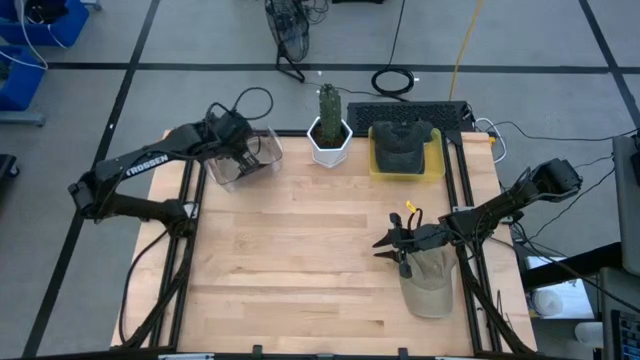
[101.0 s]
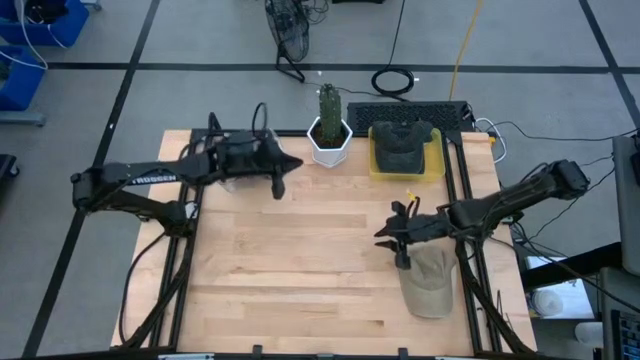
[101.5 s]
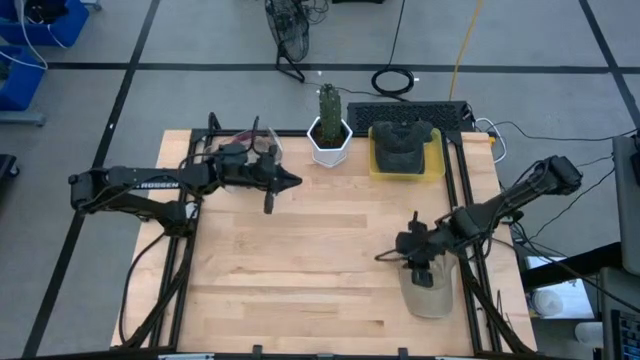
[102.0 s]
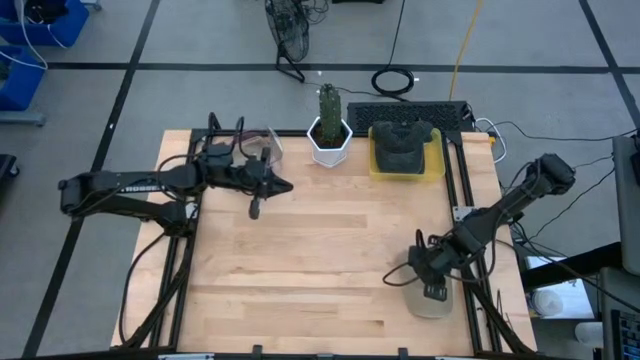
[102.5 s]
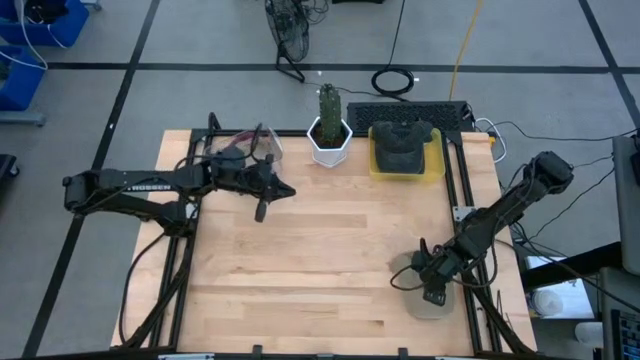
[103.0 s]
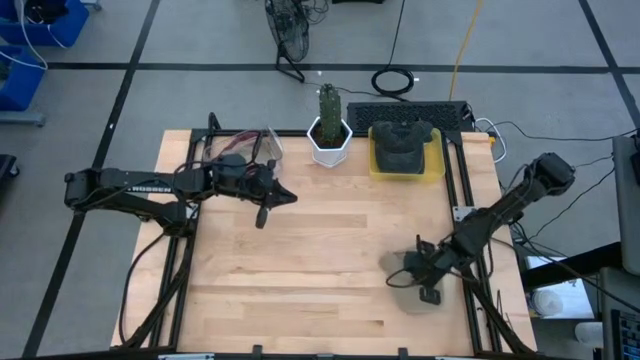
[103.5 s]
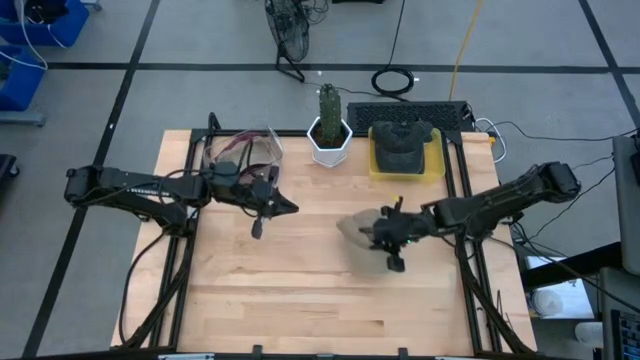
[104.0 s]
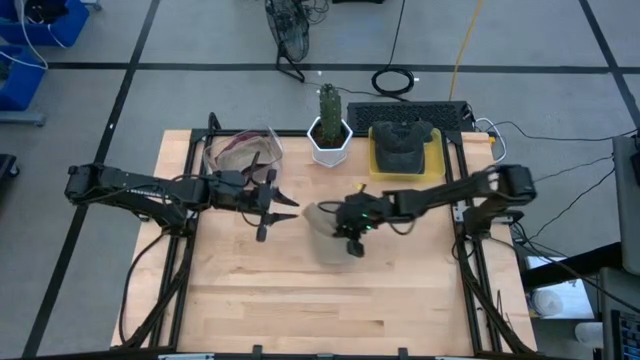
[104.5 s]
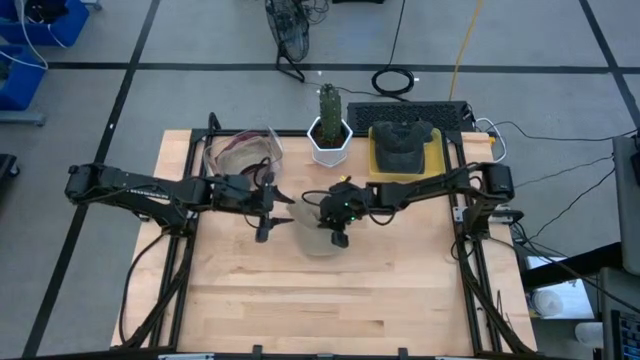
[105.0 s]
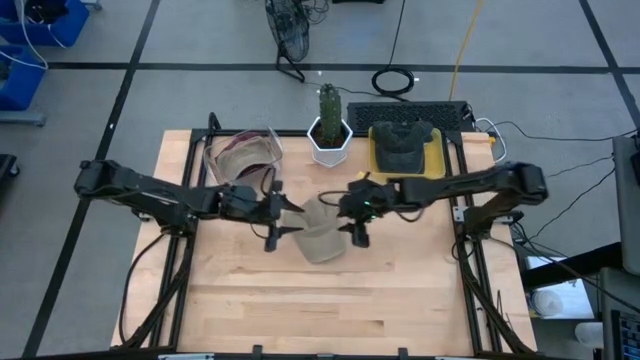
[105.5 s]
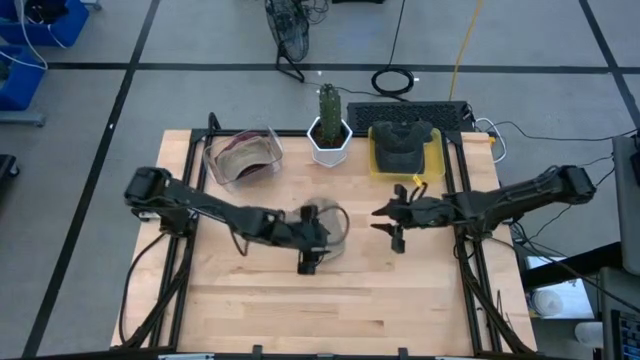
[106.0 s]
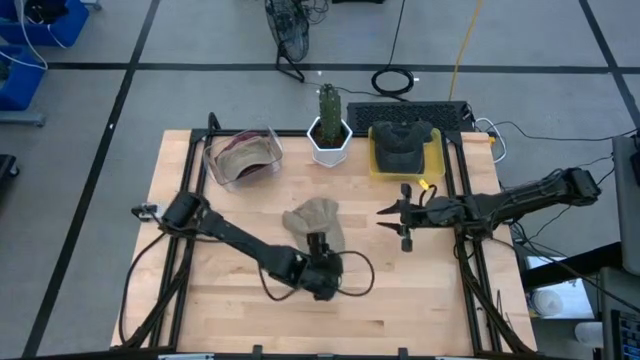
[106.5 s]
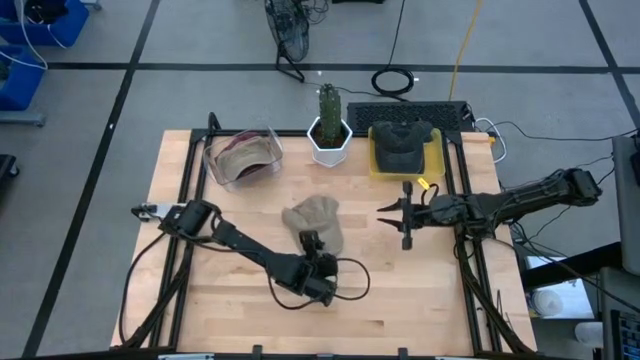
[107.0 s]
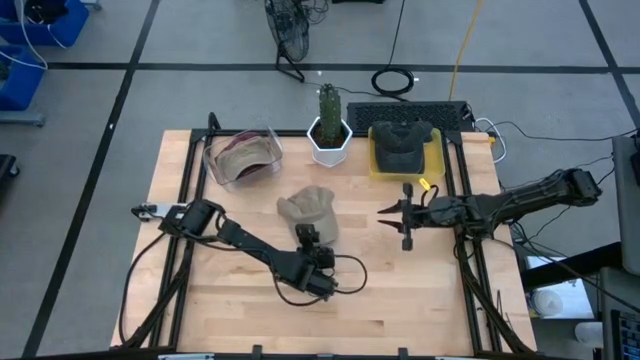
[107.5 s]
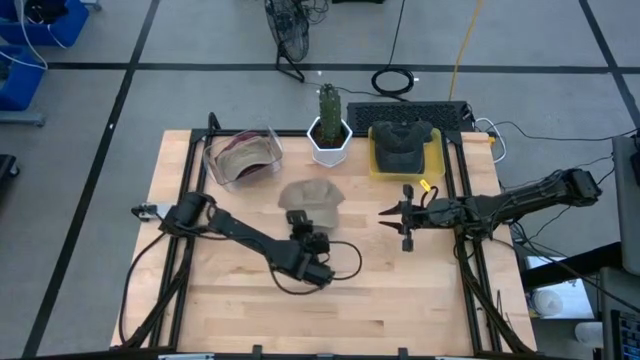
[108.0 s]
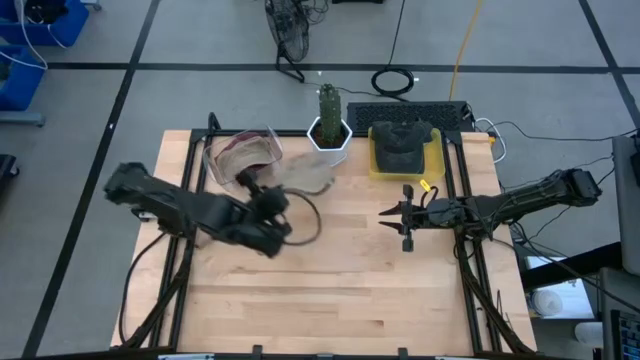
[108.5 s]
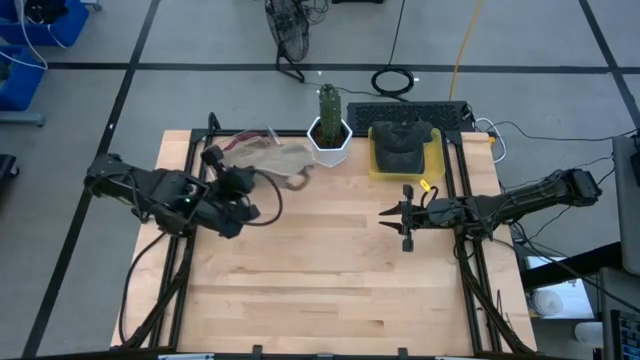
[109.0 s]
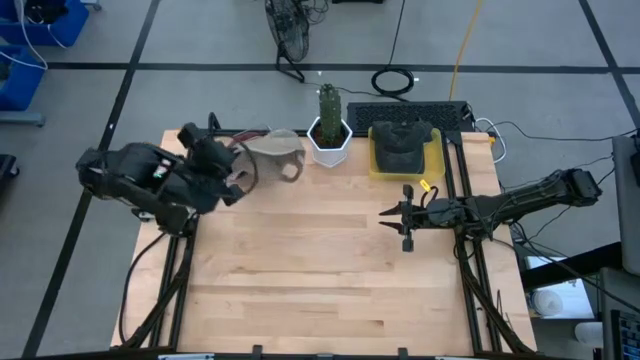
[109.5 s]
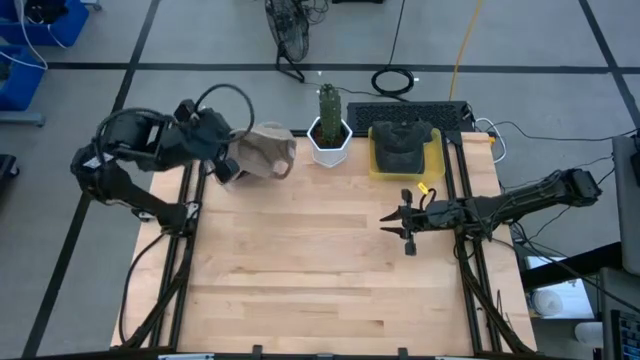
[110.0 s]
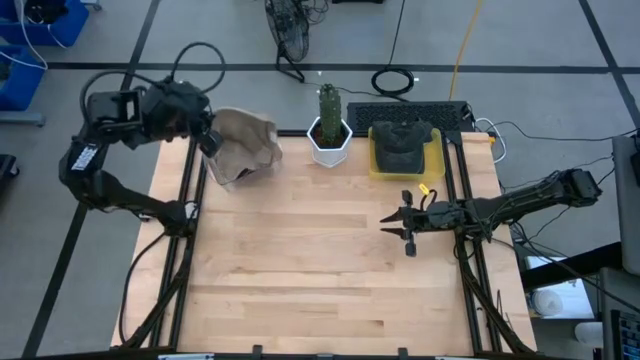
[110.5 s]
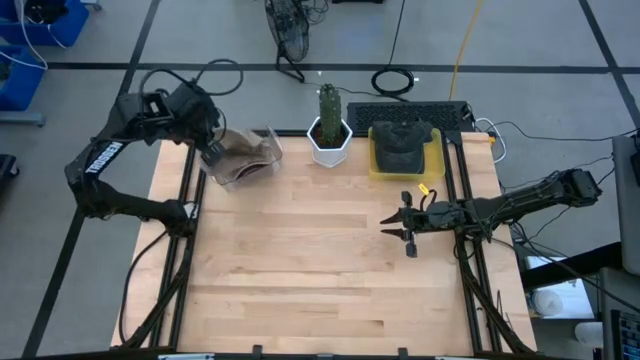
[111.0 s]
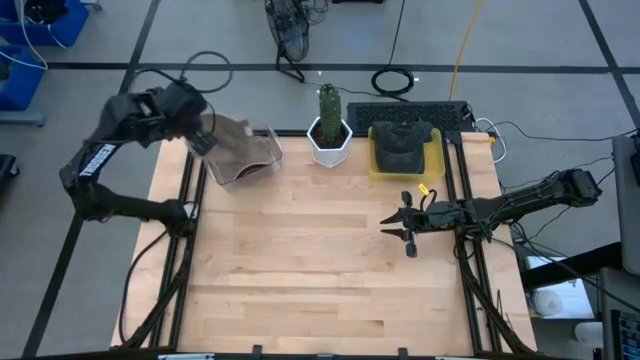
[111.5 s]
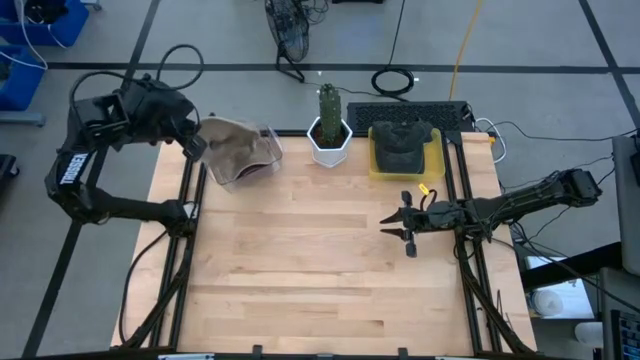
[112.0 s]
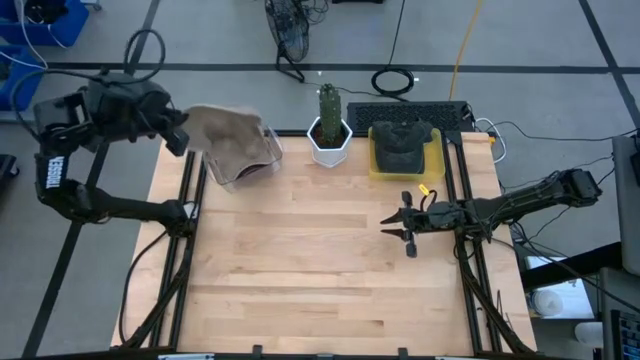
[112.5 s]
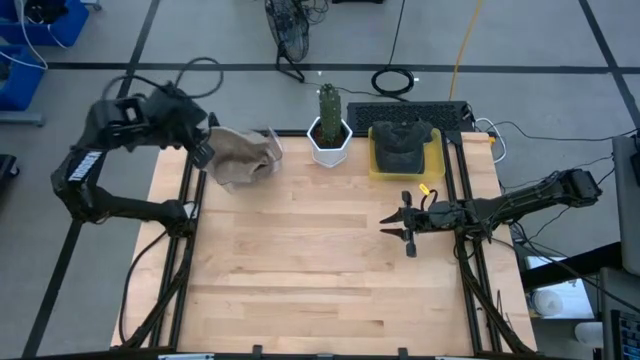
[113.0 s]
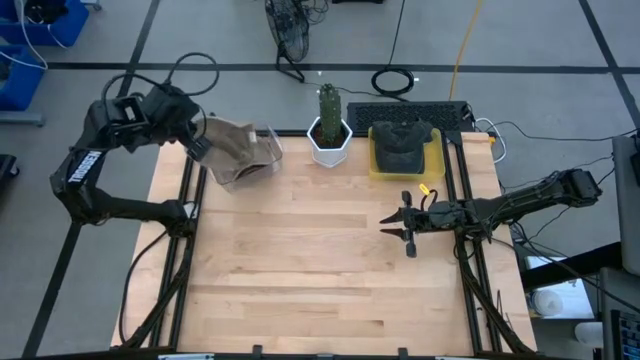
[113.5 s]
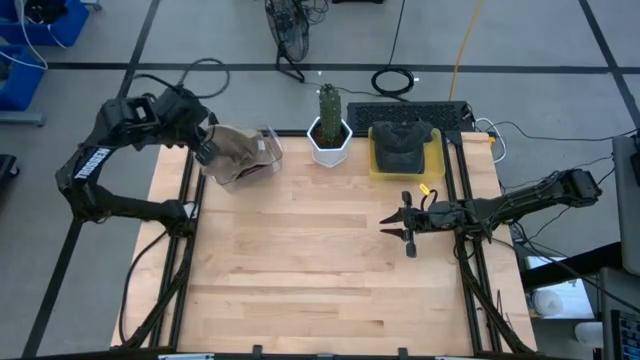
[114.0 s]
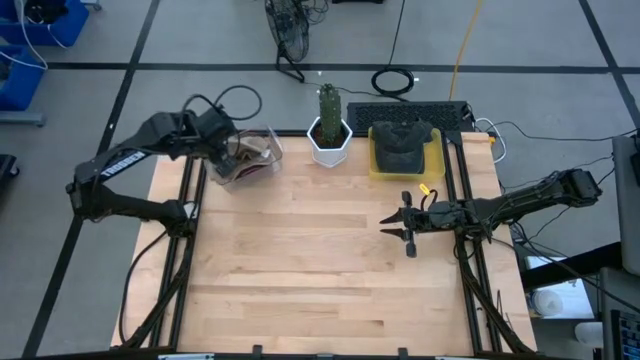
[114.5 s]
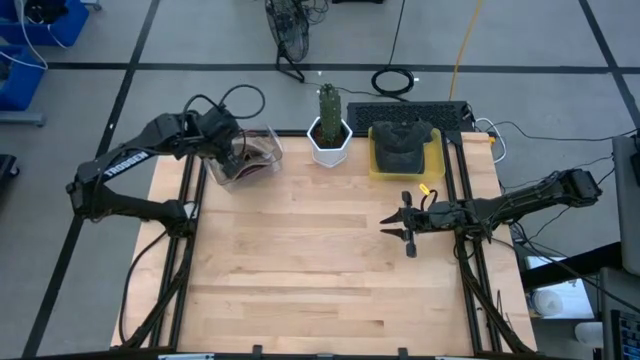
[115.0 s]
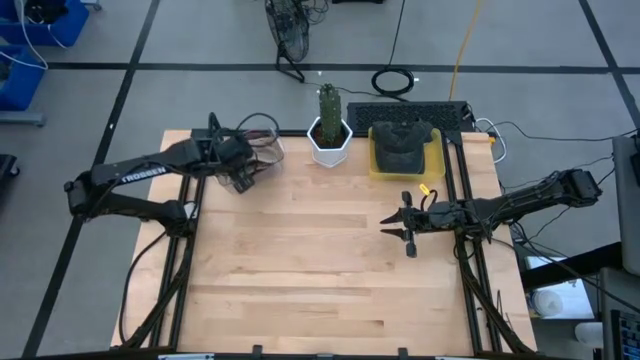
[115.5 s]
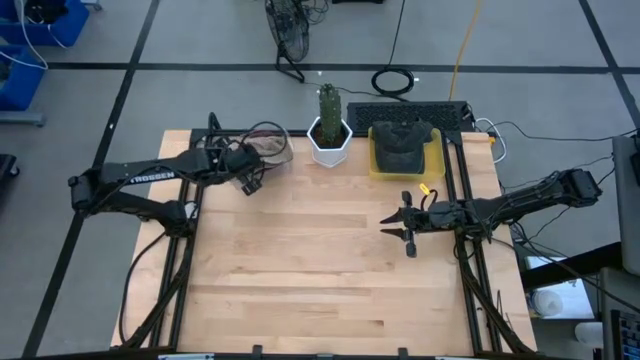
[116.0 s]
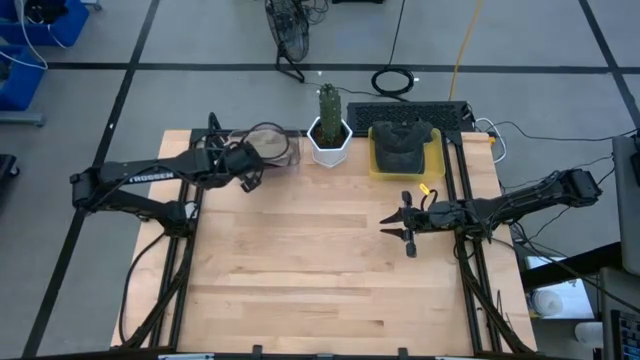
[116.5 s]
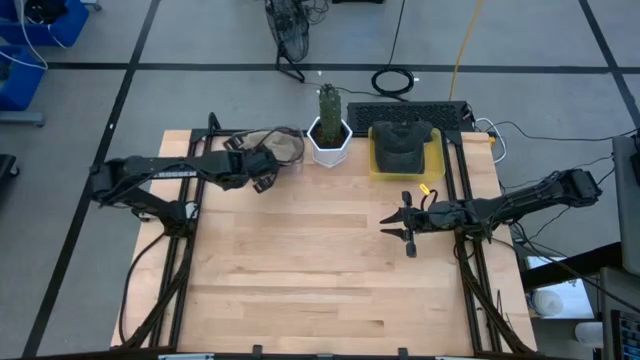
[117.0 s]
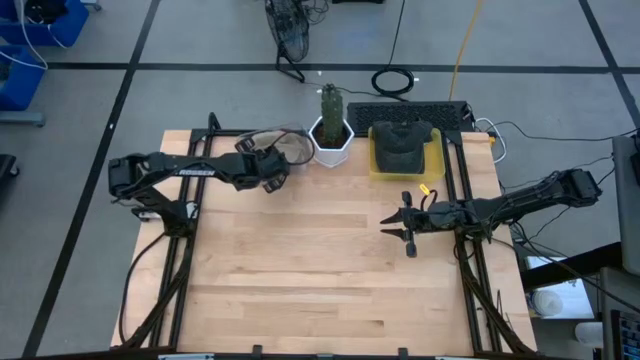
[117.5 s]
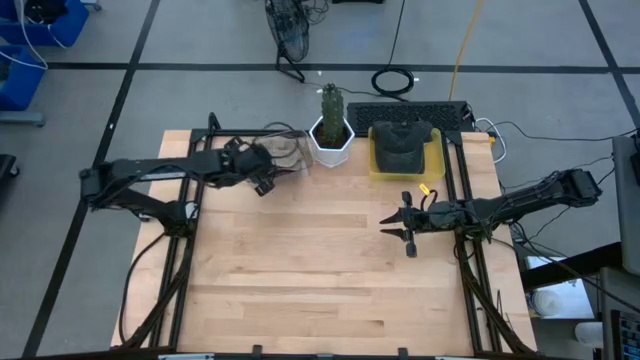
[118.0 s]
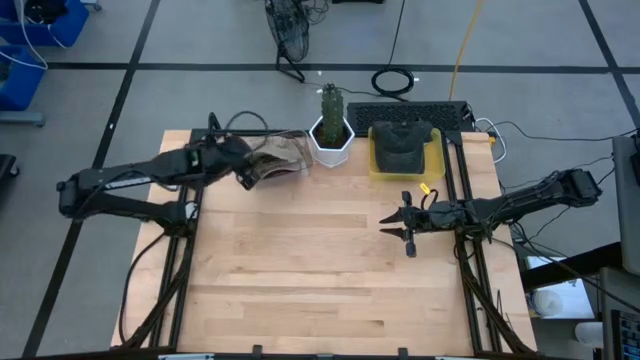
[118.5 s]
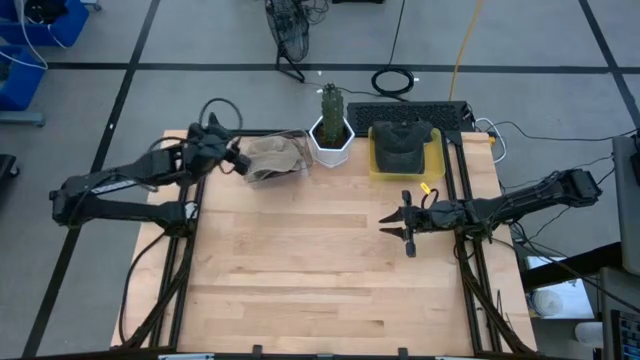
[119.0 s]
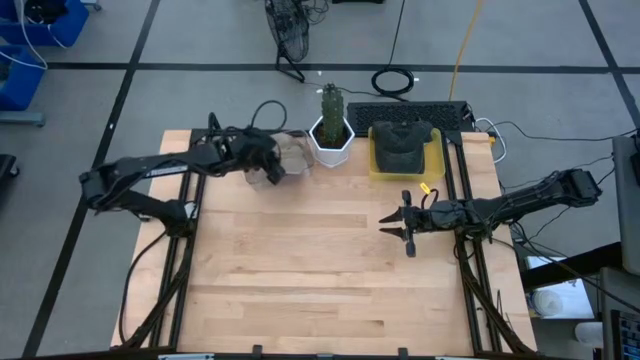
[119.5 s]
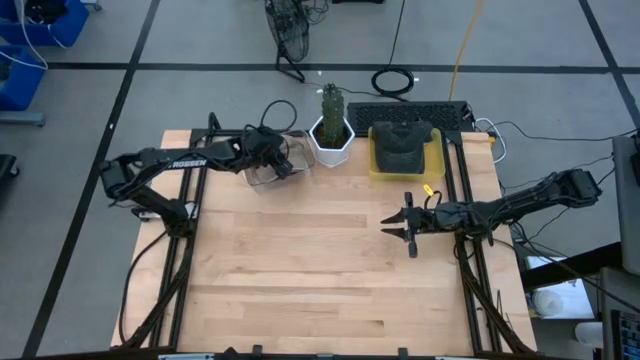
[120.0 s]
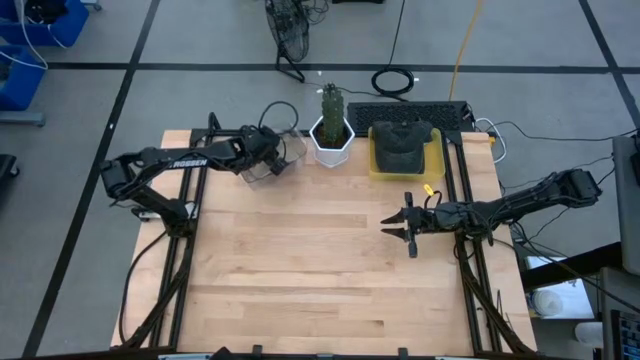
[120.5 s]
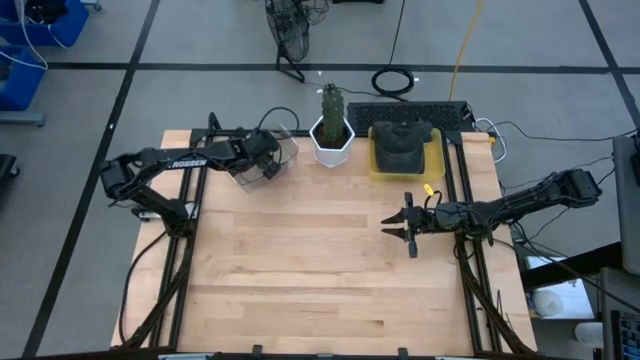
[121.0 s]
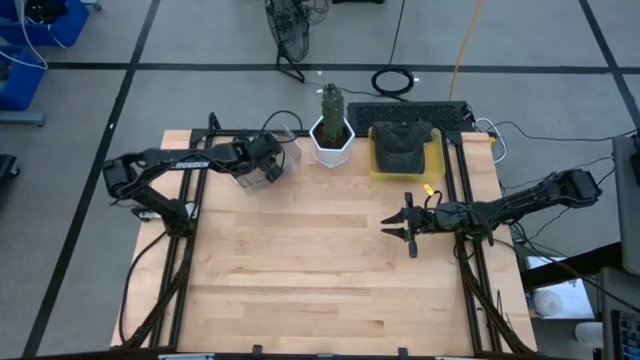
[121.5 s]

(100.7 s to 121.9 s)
Task: Pick & Place hat
Put the brown cap into the transparent bin

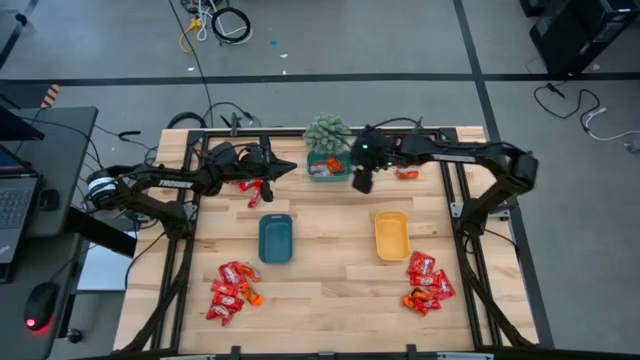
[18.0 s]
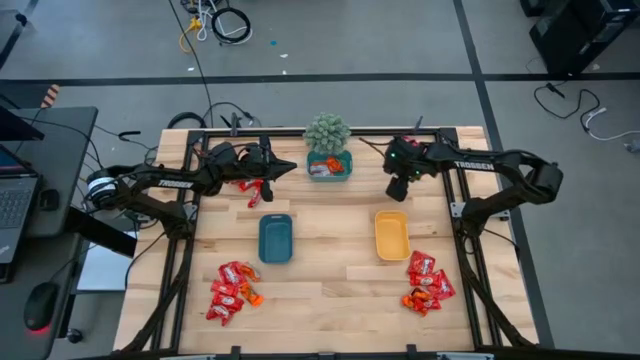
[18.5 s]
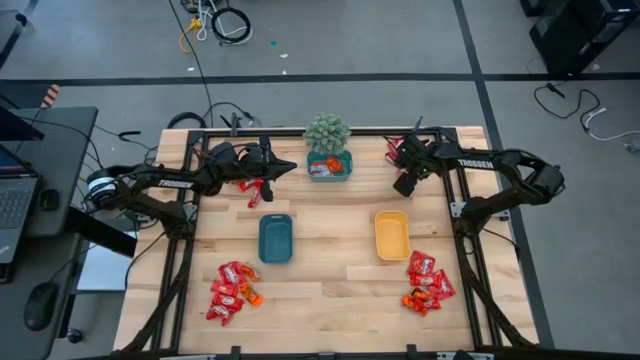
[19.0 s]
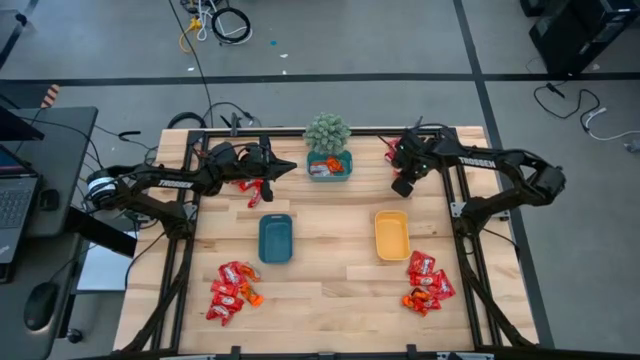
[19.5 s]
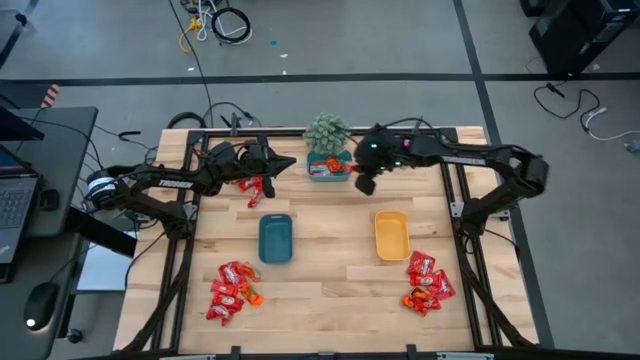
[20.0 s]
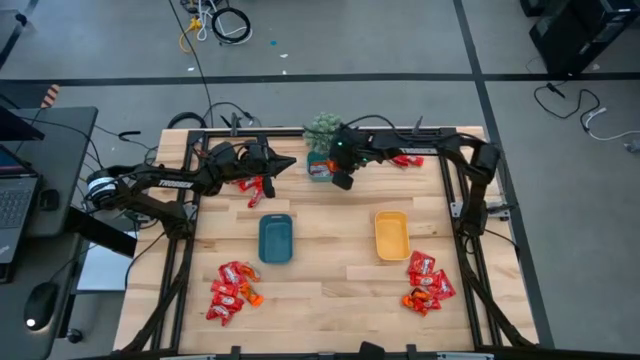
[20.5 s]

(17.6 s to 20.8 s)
Task: Sort candy
Put the orange chocolate into the green bin
